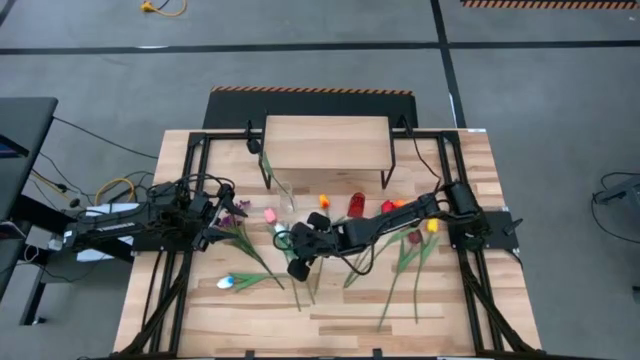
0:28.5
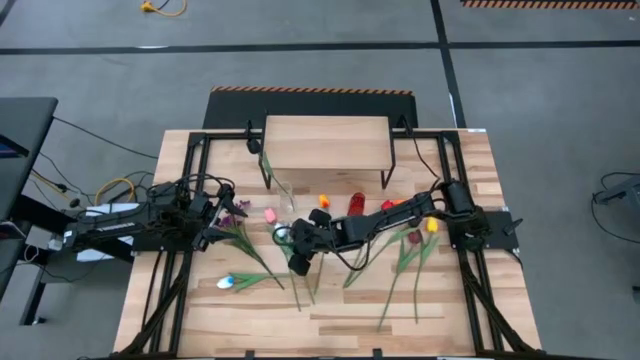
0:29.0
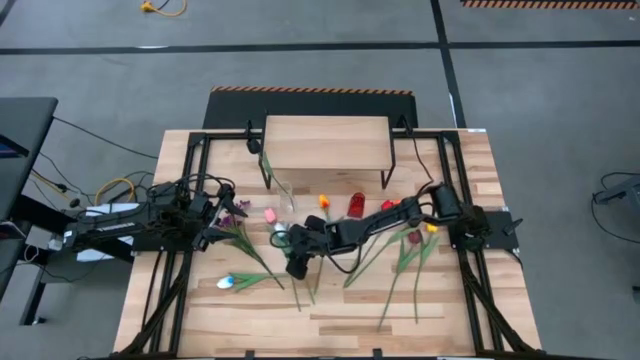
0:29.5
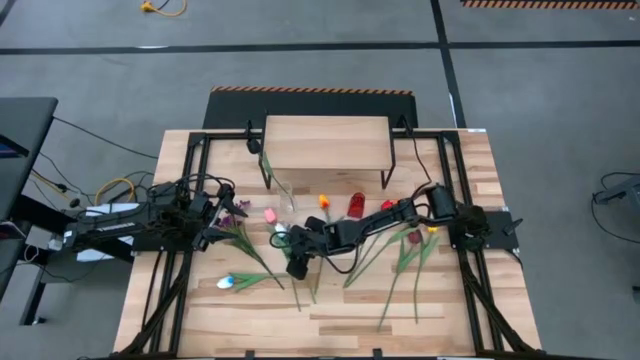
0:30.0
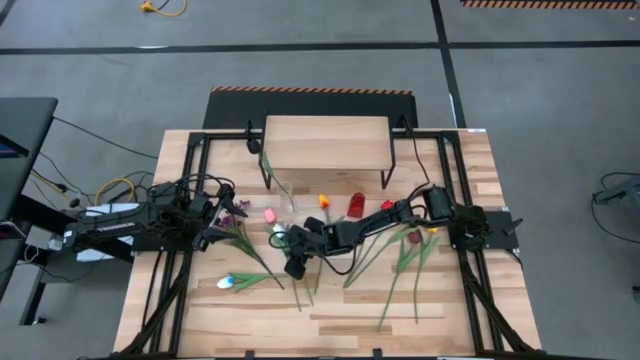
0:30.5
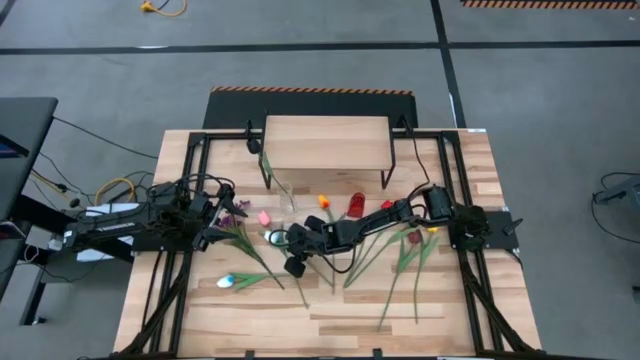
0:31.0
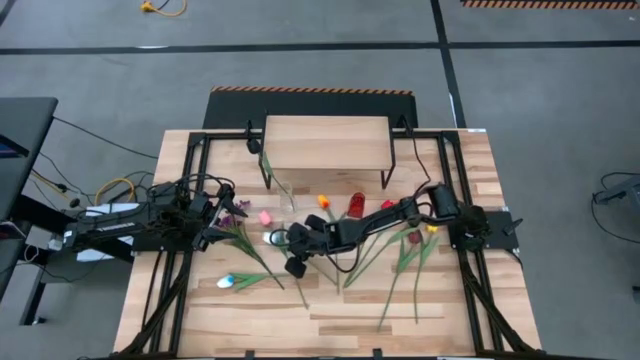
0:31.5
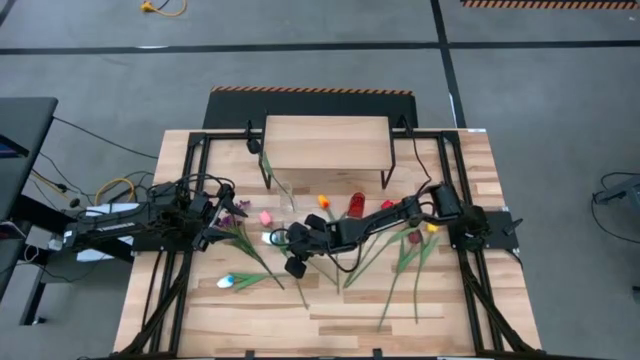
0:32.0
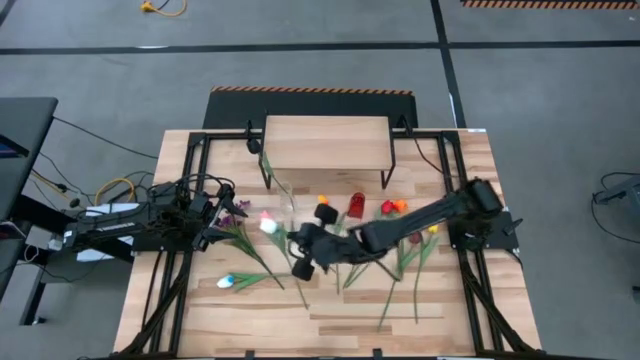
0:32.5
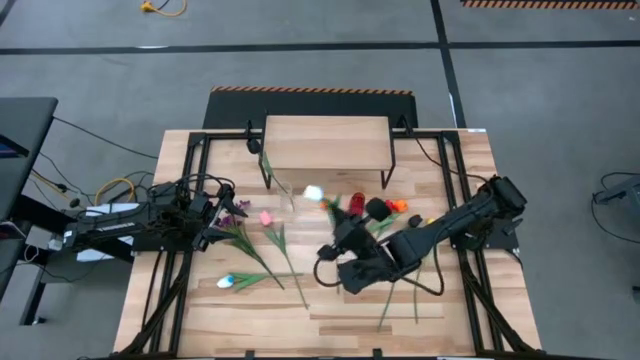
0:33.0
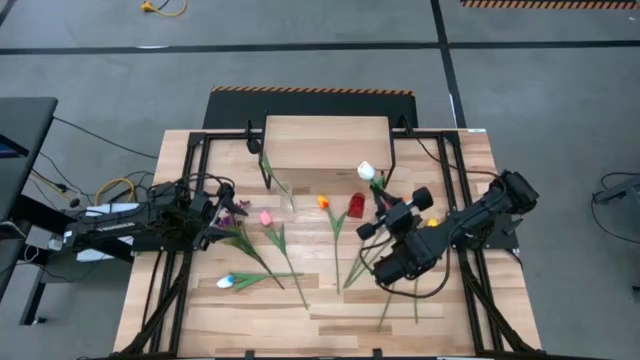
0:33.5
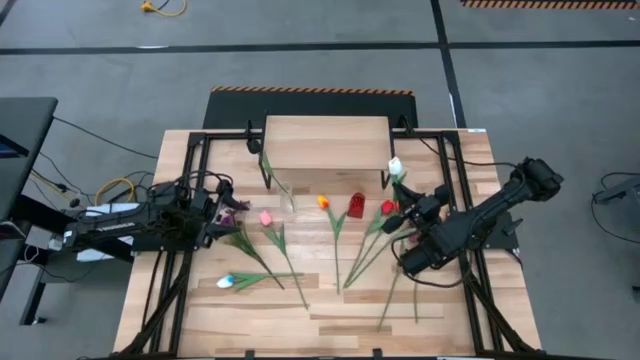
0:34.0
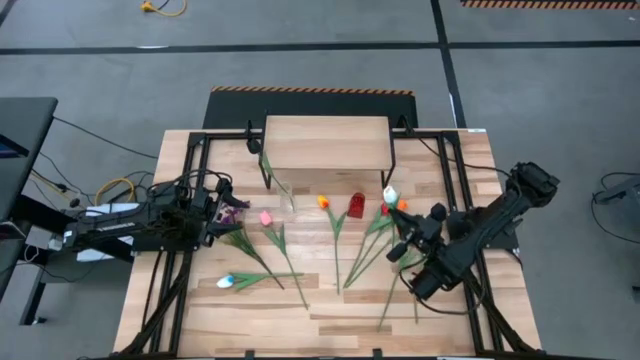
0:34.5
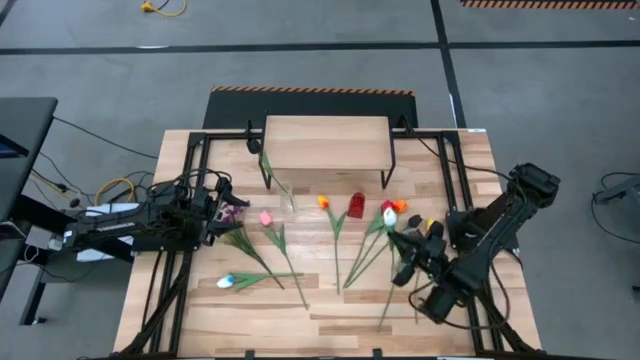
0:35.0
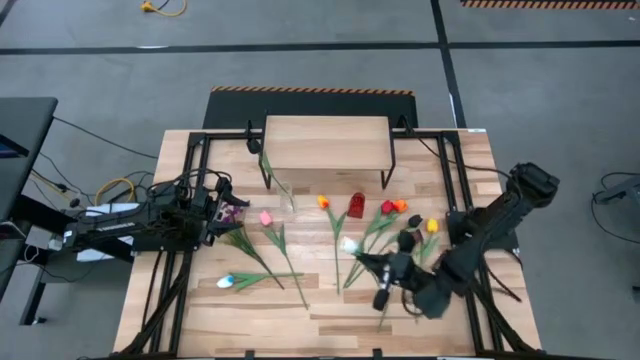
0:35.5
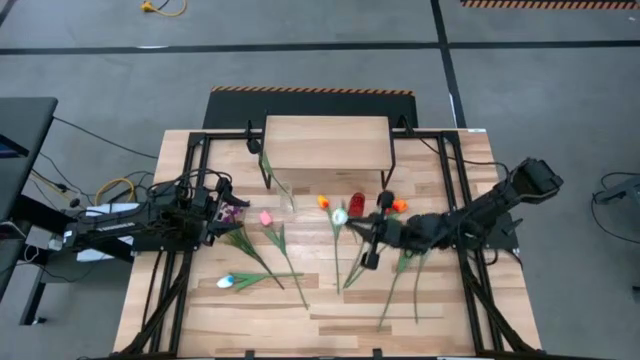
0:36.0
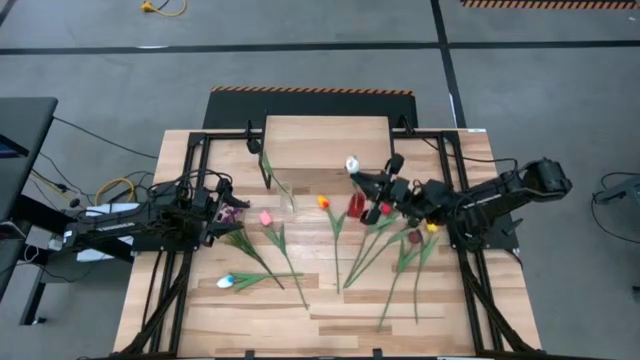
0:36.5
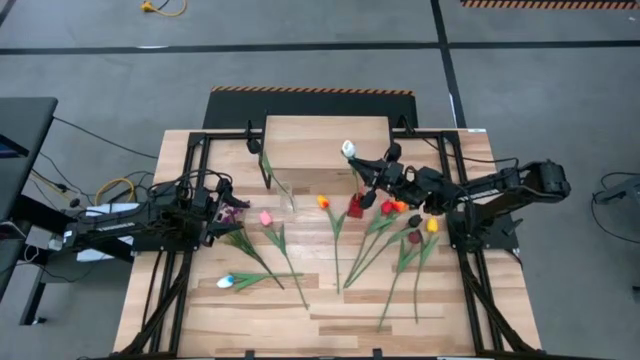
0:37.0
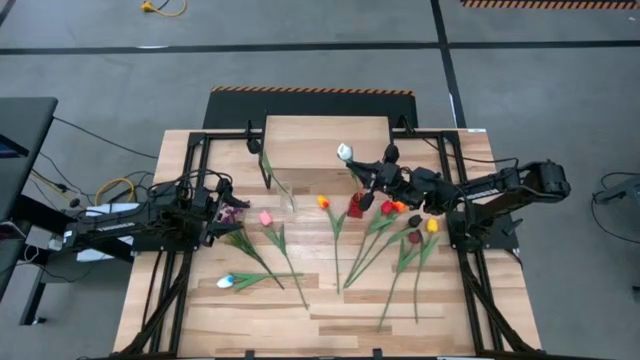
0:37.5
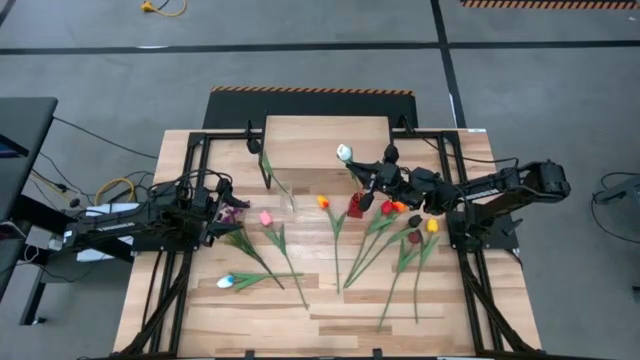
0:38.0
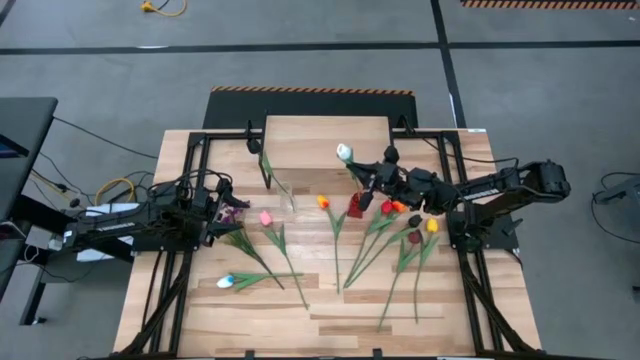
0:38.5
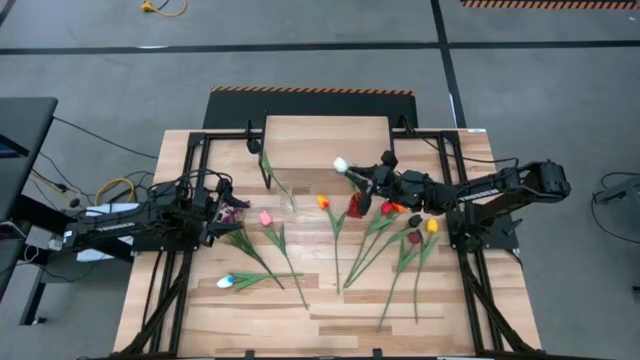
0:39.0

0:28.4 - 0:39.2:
Task: Pick and place flowers into a vace then onto a shelf
Put the top white flower into the red vase

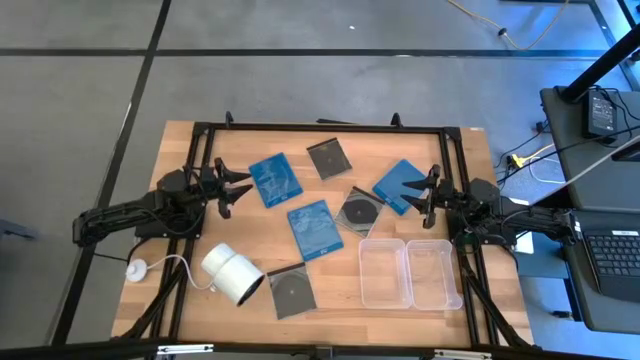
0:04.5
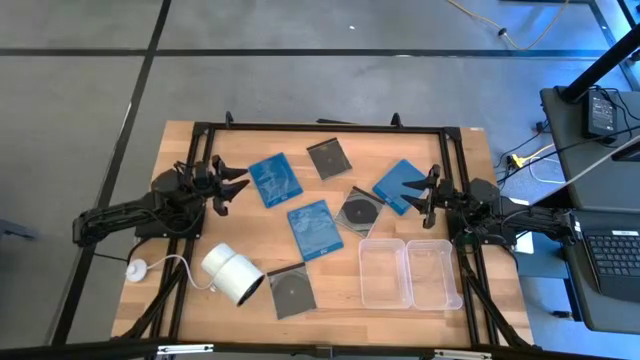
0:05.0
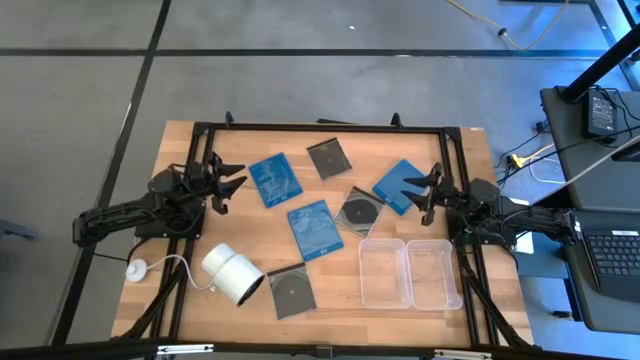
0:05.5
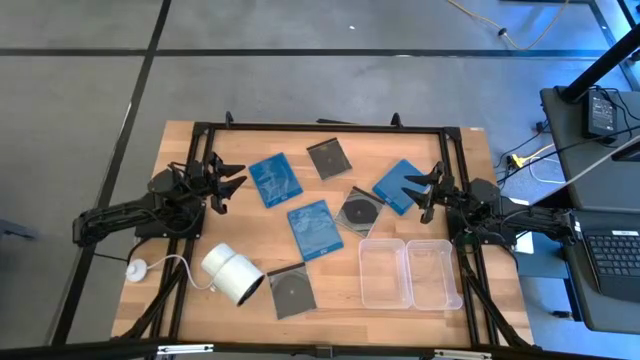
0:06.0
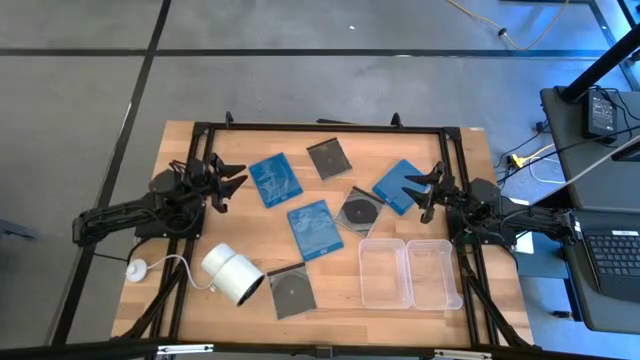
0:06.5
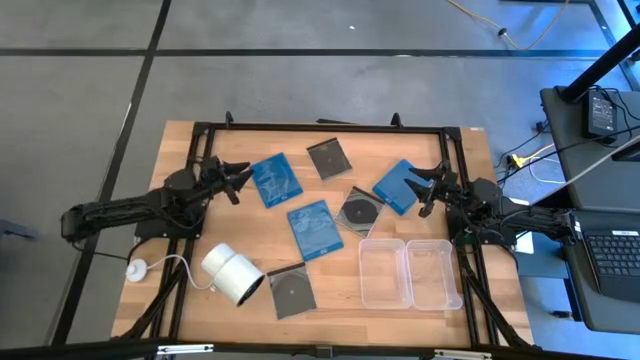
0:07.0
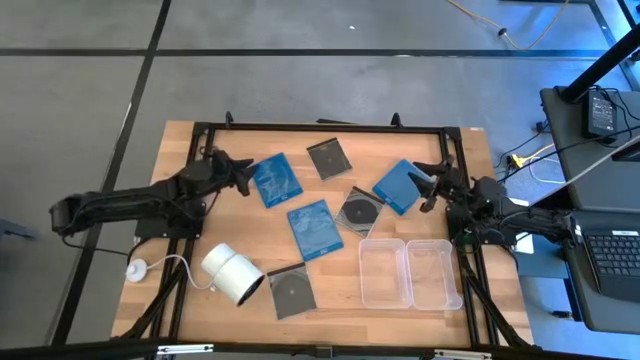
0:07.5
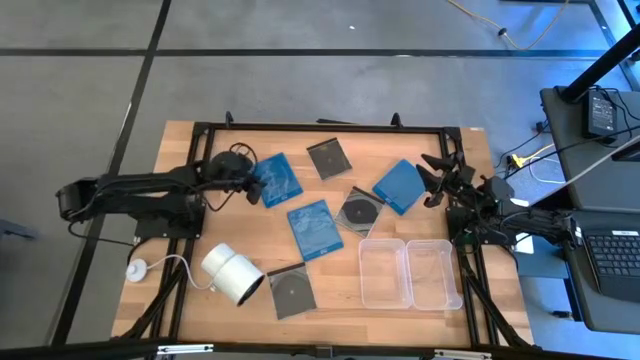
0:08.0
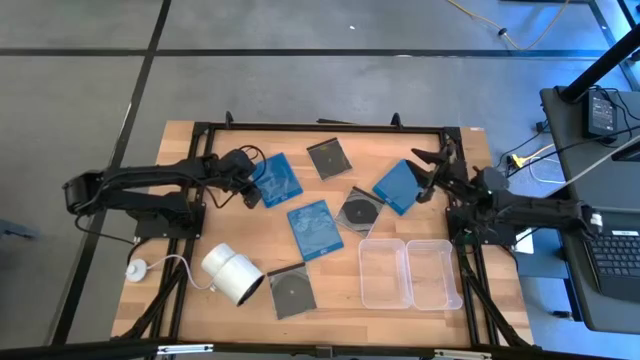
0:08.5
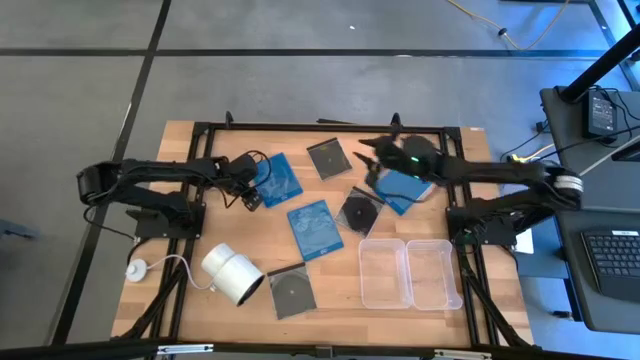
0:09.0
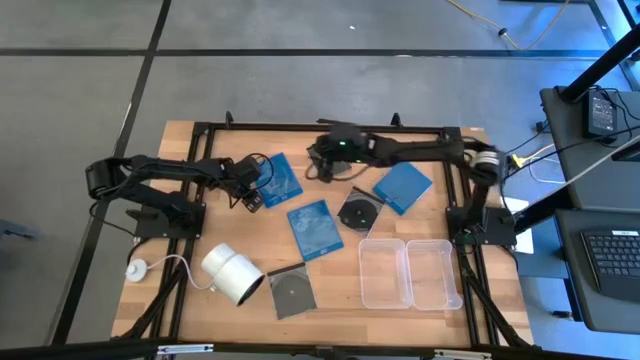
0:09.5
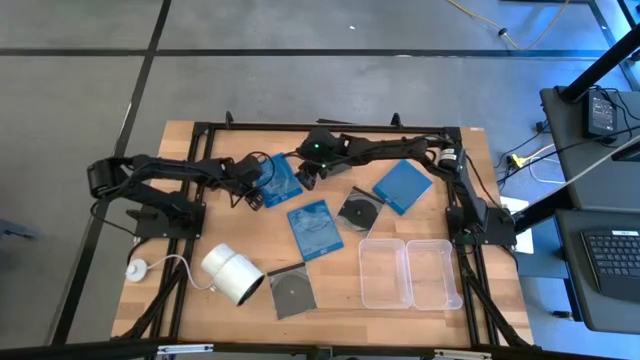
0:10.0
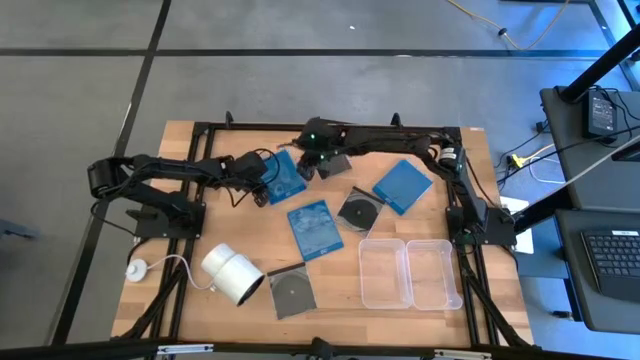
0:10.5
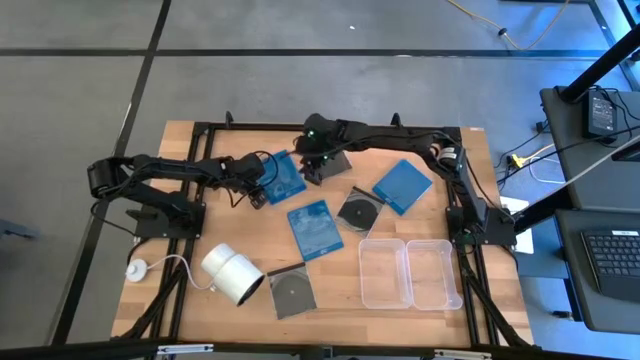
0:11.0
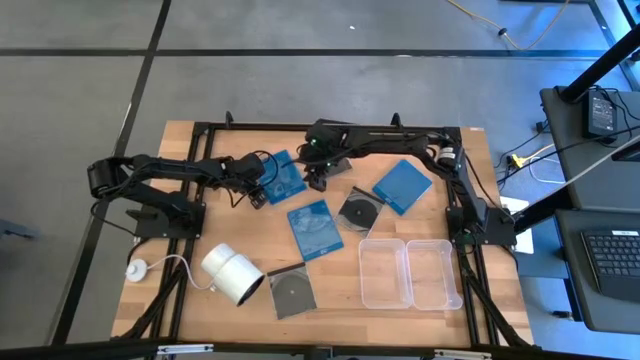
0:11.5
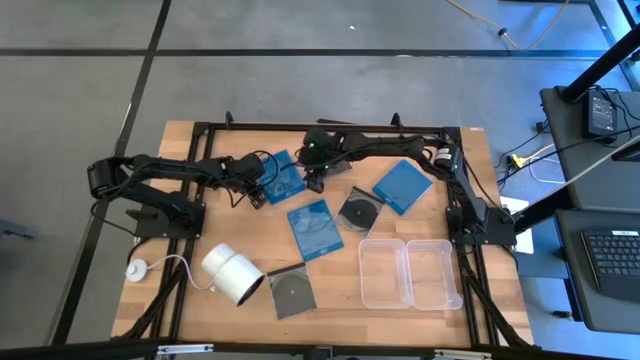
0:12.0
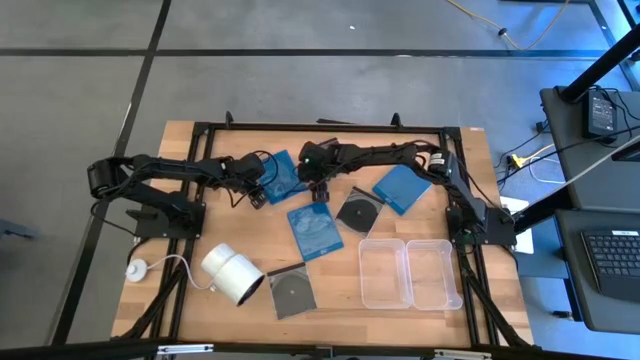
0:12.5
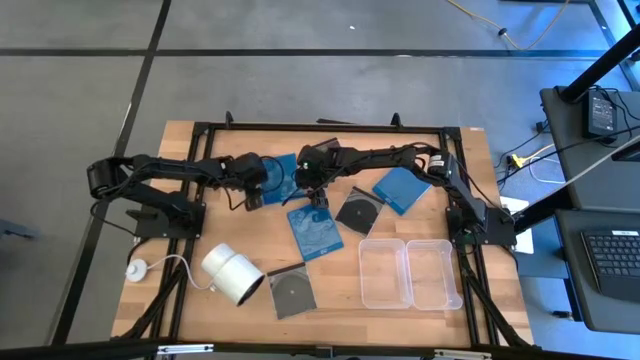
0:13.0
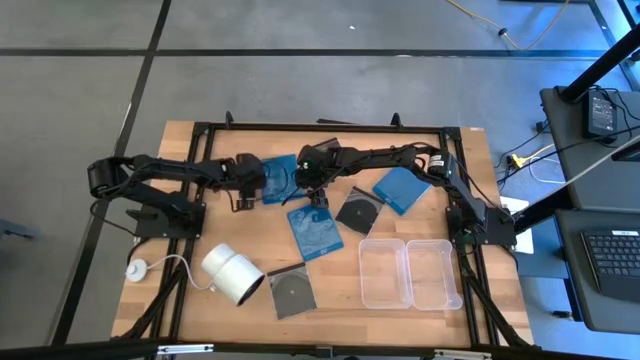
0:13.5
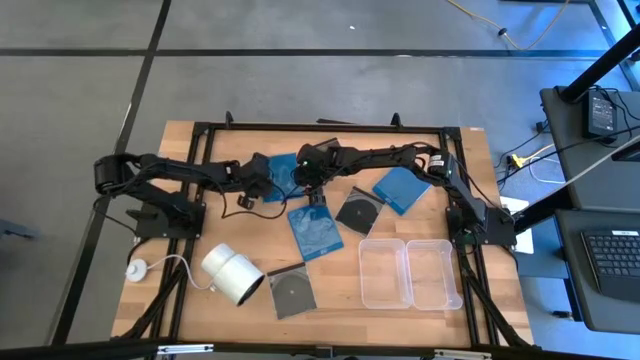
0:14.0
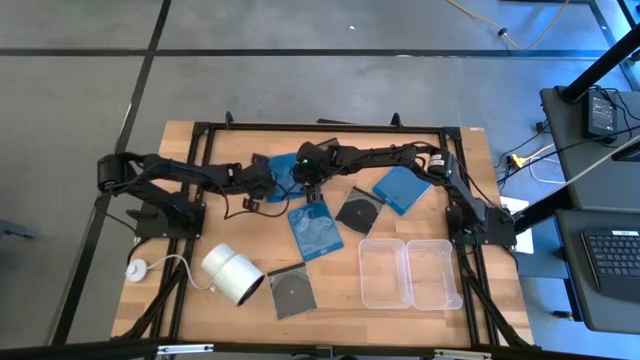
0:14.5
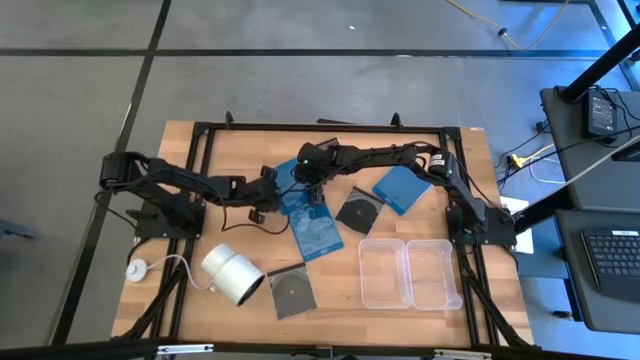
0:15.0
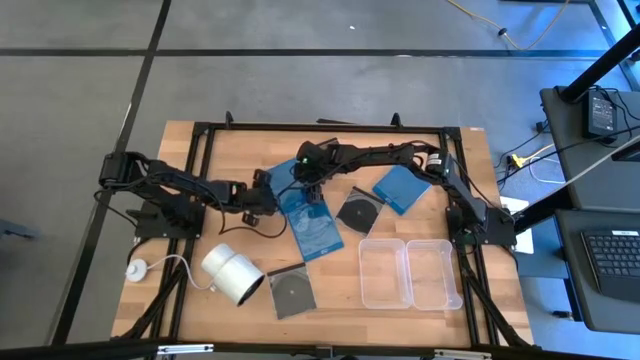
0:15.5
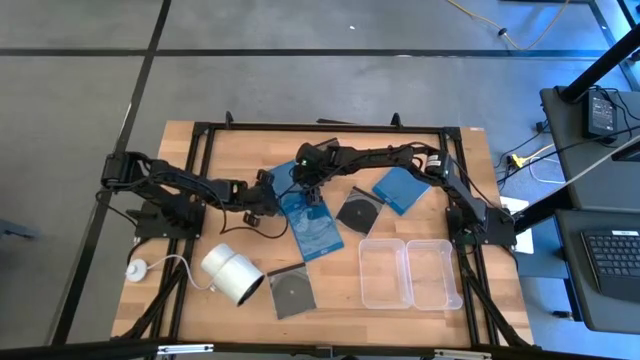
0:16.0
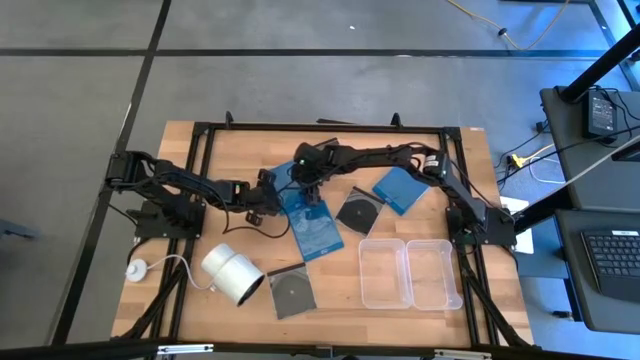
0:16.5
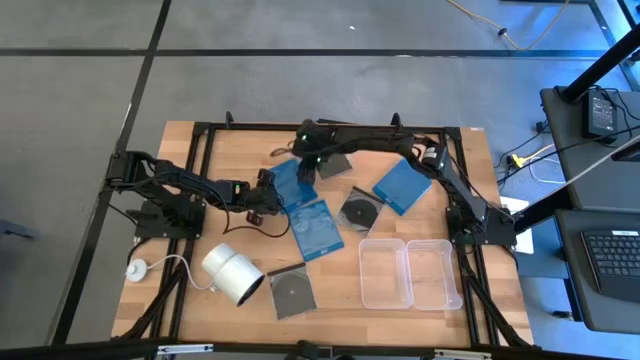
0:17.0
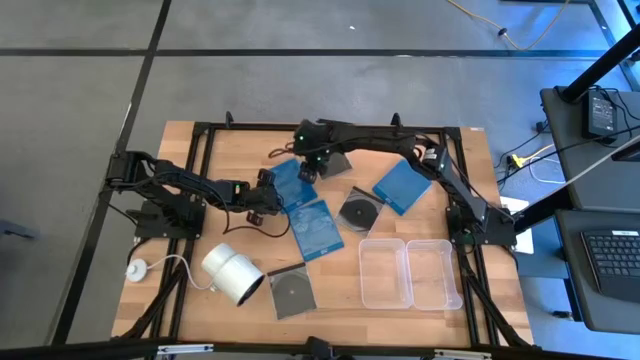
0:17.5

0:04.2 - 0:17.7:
Task: Pick & place jewel cases by type
Put the top left blue CD case into the right transparent bin
